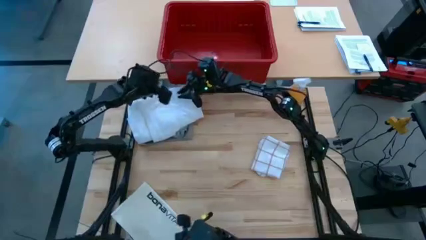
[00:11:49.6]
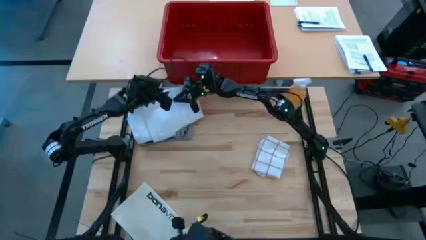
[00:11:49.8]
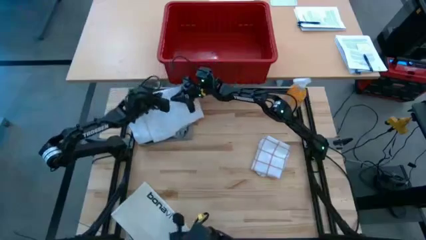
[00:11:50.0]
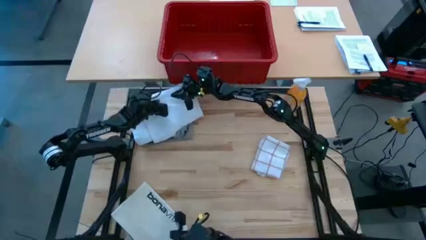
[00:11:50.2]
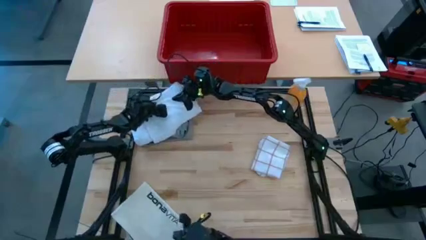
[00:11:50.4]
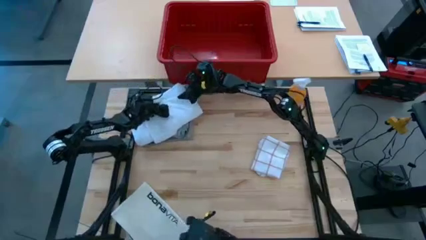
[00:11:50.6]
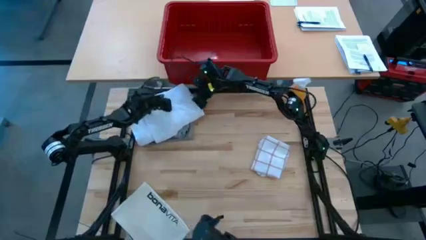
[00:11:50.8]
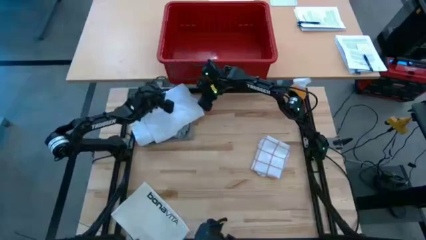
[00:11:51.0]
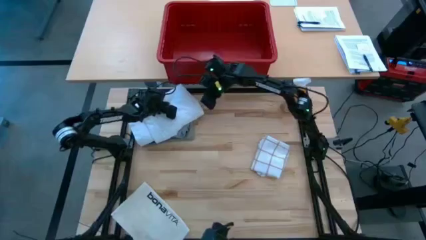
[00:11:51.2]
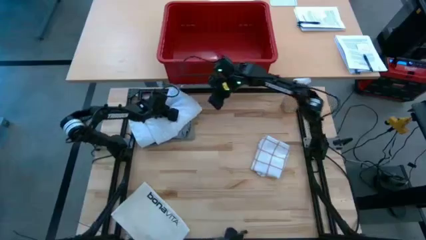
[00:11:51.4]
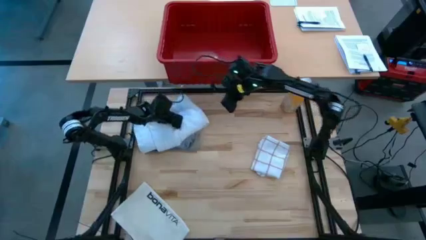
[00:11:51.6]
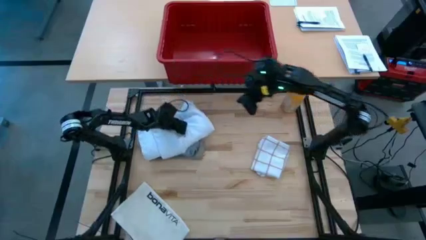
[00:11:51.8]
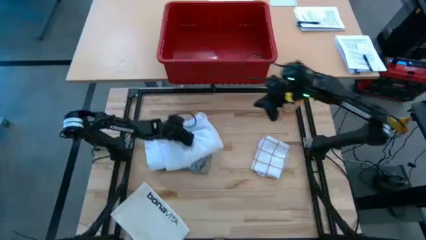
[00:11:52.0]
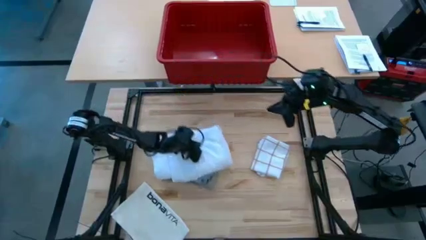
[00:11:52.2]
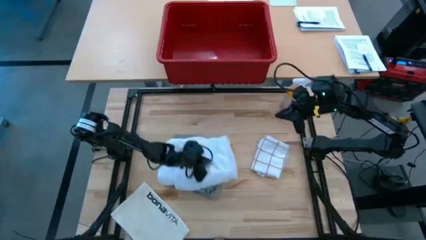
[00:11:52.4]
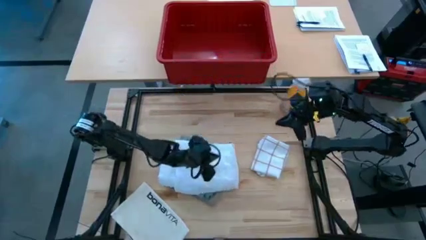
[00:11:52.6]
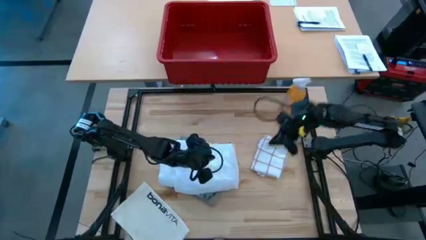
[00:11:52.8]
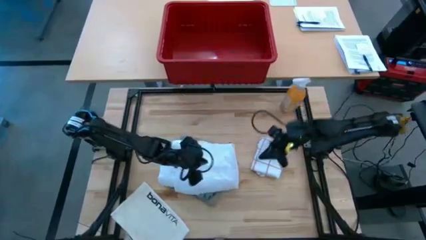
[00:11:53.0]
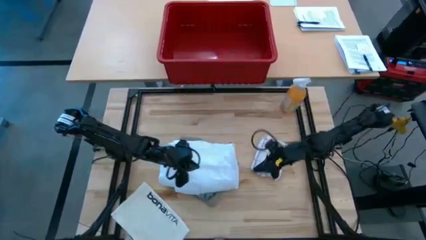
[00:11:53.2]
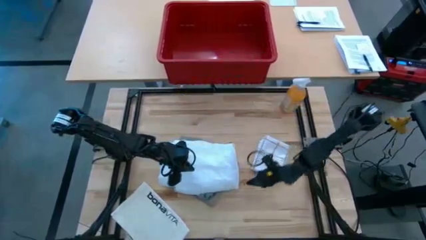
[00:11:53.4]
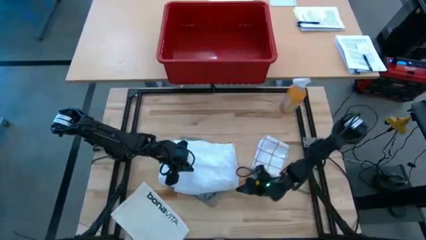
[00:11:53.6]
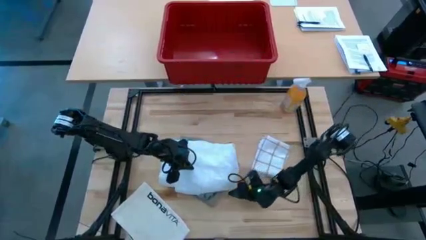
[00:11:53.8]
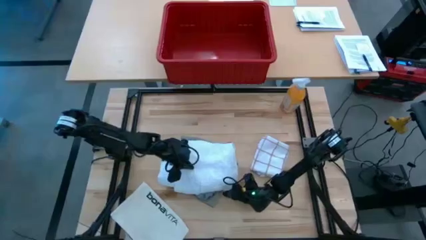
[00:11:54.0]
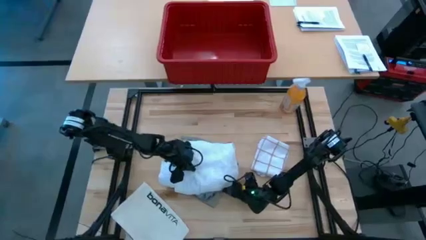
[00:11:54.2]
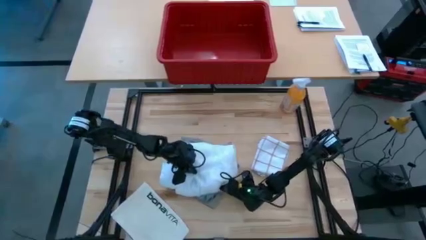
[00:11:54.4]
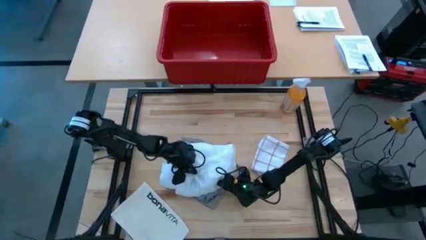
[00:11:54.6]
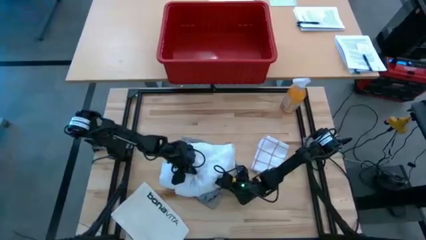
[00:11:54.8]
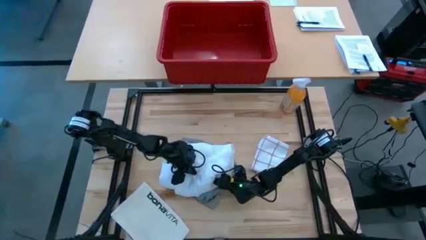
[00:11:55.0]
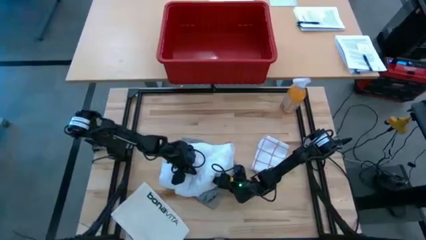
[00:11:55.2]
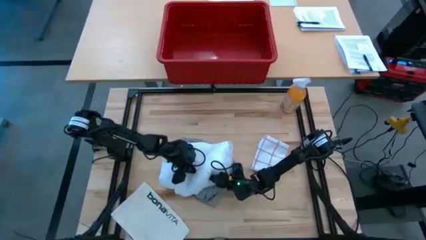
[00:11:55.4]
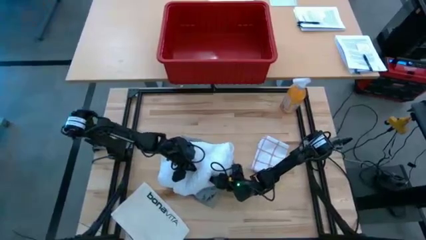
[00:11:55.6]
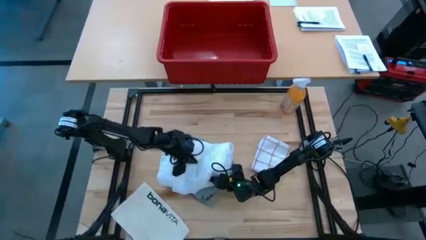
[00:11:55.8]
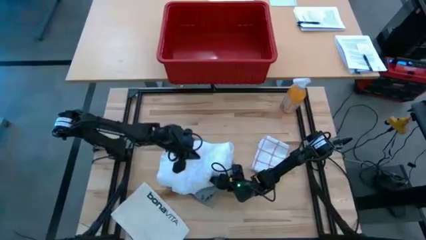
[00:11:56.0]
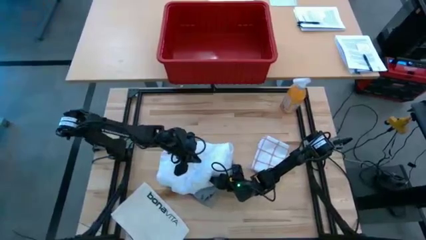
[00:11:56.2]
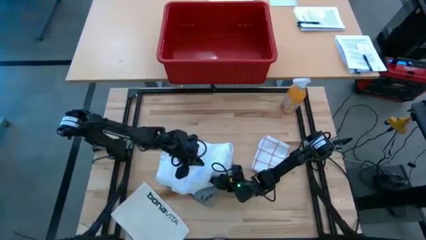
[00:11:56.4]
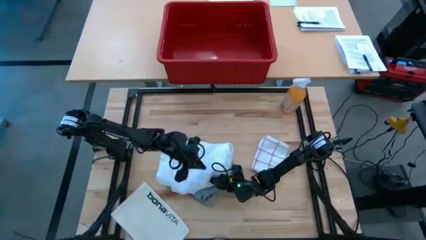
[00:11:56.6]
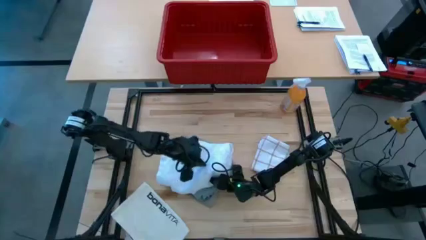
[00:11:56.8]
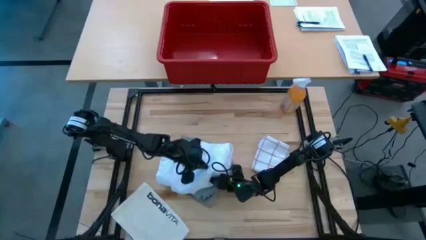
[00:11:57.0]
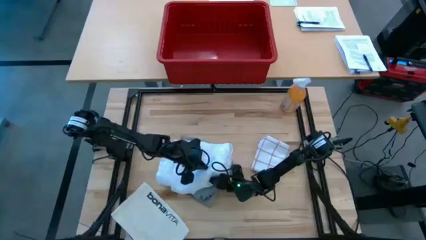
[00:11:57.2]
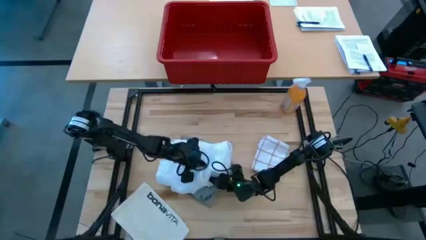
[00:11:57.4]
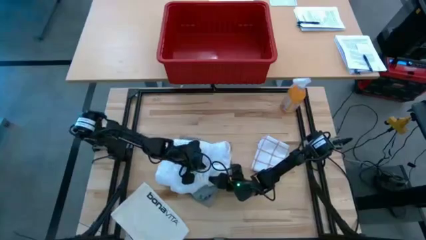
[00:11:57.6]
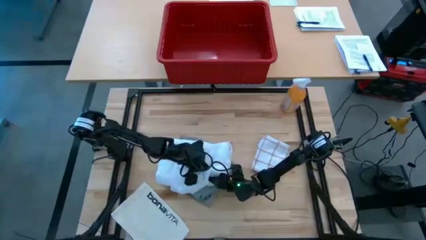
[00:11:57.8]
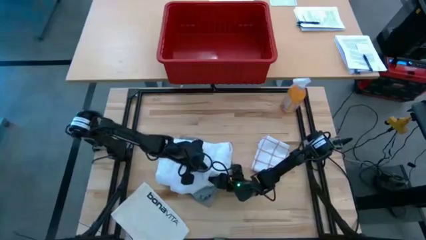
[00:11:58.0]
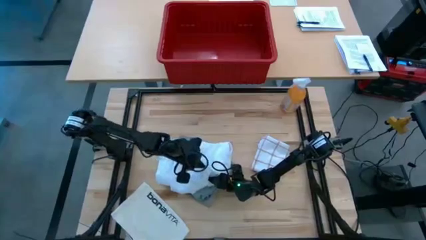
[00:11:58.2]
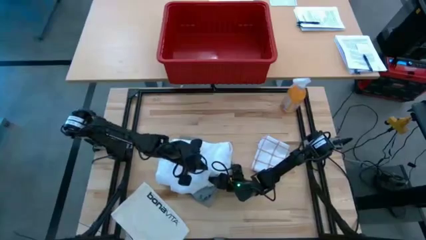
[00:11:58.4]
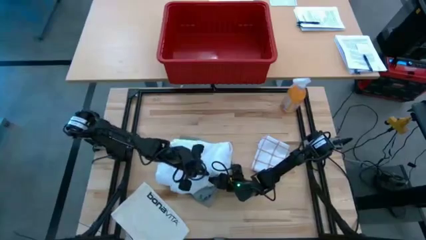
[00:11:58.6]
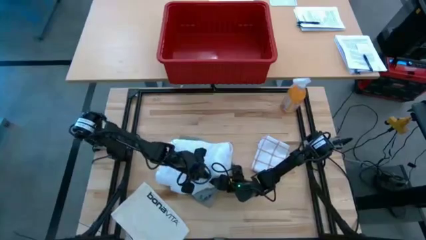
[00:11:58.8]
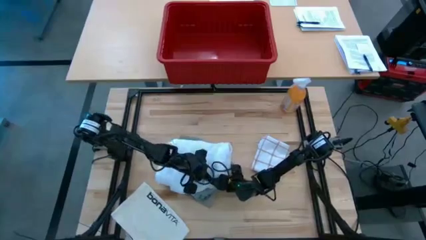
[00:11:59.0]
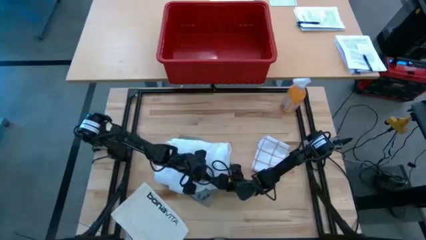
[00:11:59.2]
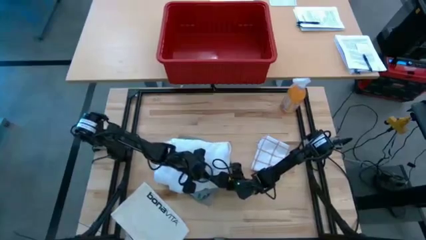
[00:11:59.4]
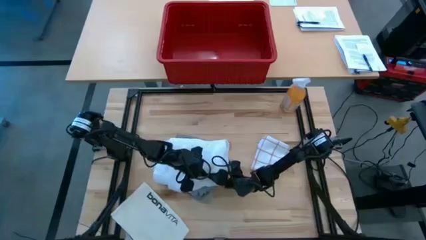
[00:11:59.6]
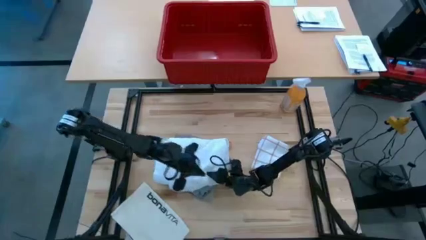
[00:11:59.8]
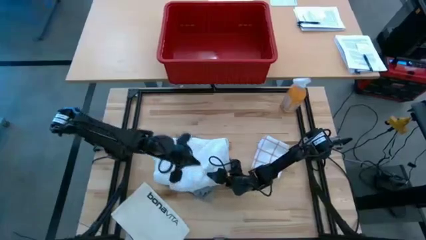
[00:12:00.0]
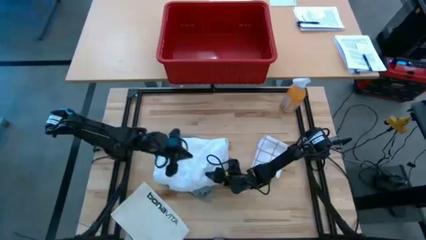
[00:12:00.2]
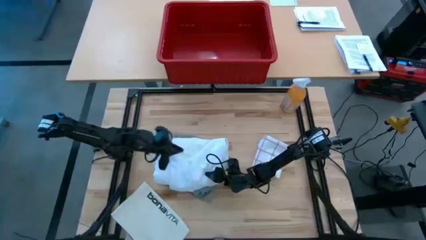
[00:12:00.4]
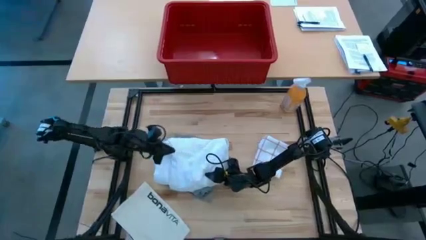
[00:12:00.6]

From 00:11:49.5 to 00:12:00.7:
Task: Fold laundry
Put the stack of clothes into the red bin

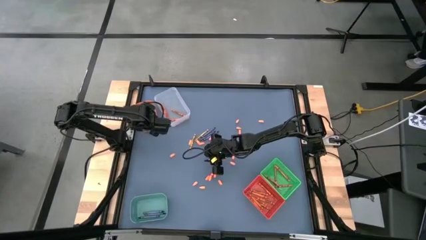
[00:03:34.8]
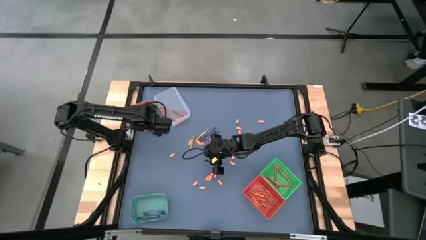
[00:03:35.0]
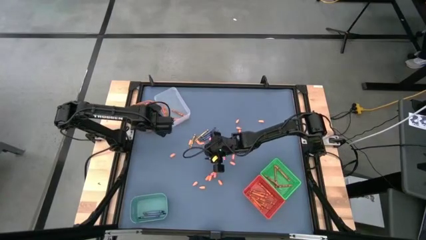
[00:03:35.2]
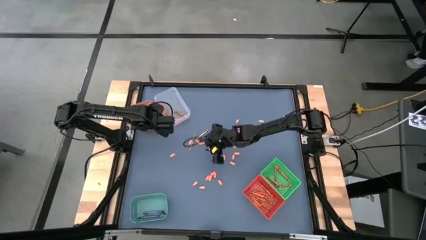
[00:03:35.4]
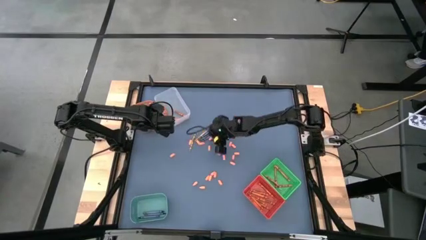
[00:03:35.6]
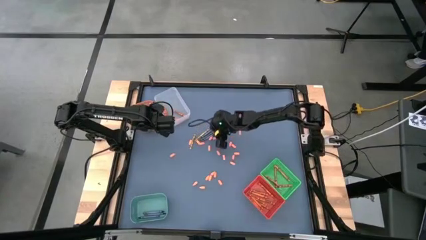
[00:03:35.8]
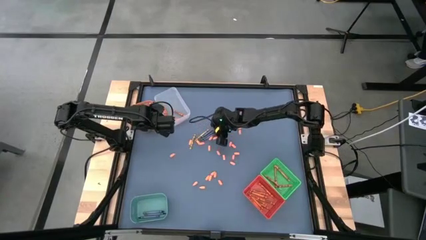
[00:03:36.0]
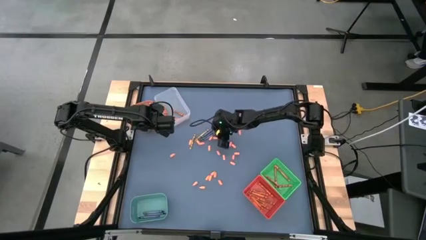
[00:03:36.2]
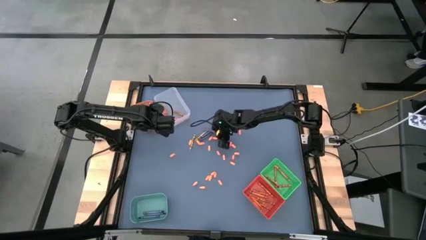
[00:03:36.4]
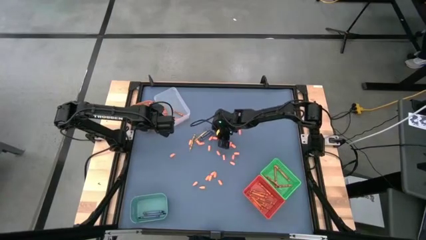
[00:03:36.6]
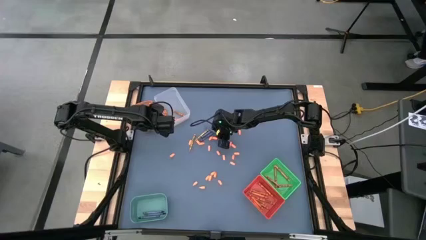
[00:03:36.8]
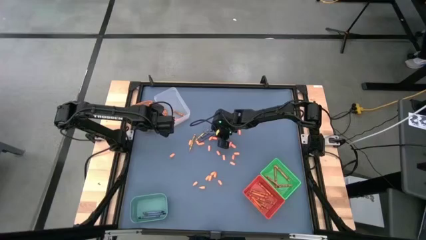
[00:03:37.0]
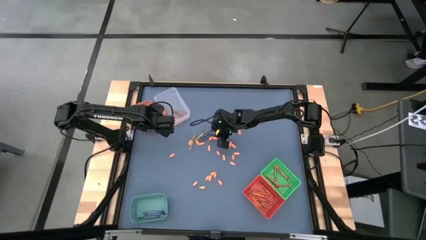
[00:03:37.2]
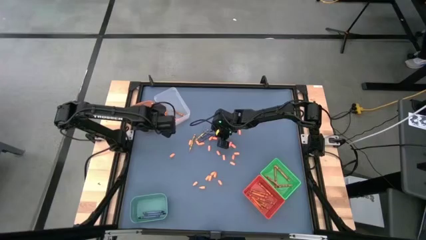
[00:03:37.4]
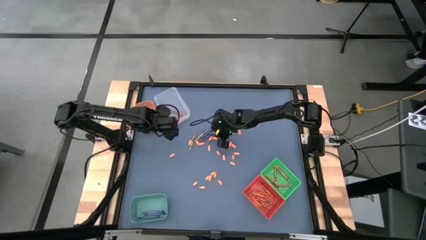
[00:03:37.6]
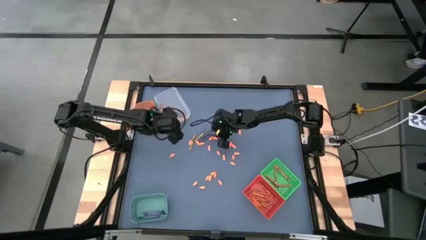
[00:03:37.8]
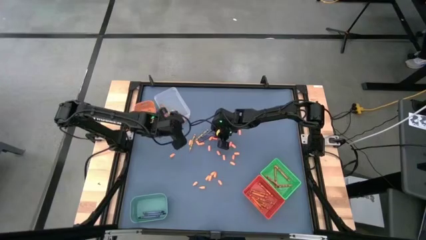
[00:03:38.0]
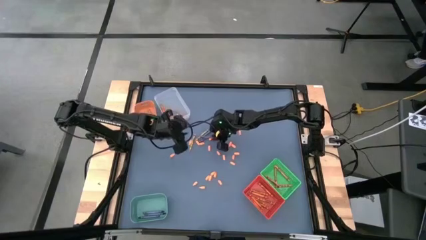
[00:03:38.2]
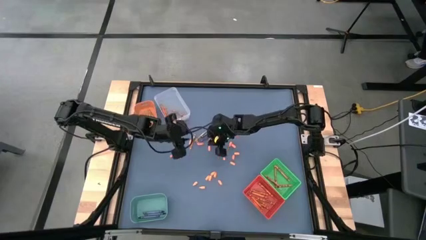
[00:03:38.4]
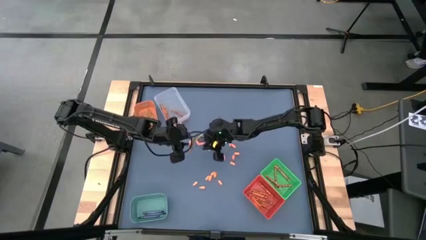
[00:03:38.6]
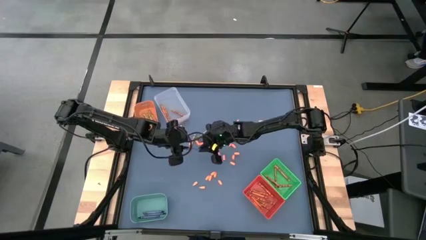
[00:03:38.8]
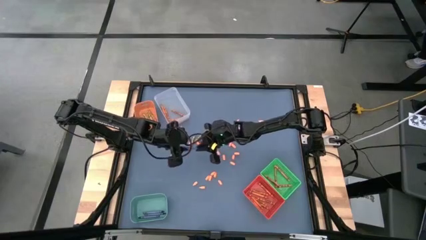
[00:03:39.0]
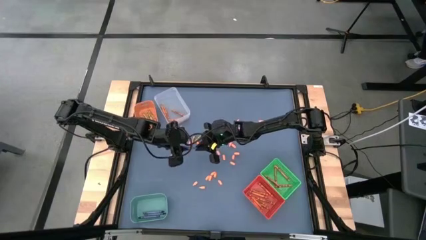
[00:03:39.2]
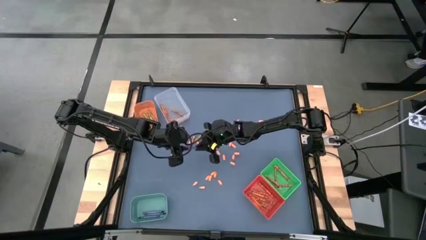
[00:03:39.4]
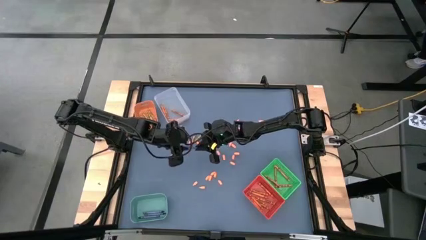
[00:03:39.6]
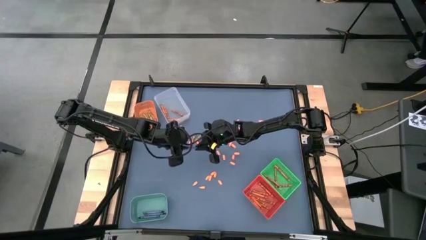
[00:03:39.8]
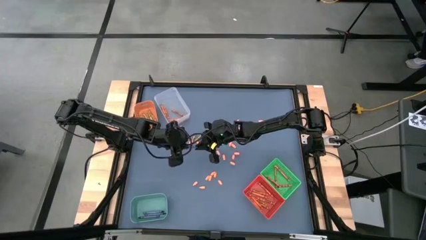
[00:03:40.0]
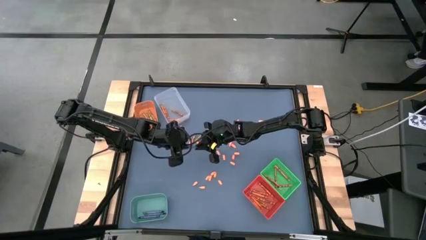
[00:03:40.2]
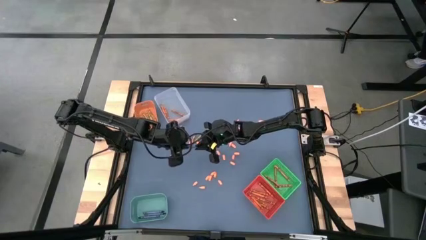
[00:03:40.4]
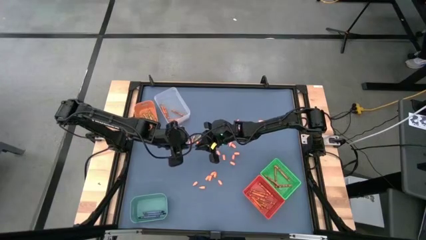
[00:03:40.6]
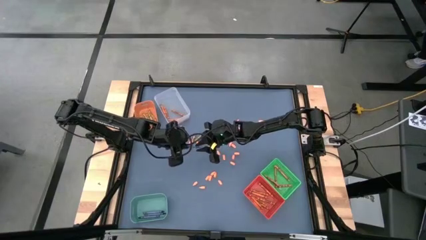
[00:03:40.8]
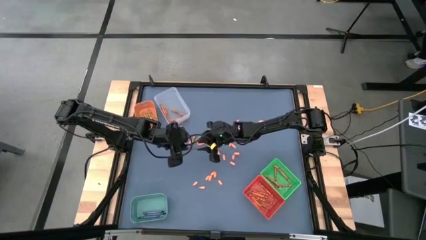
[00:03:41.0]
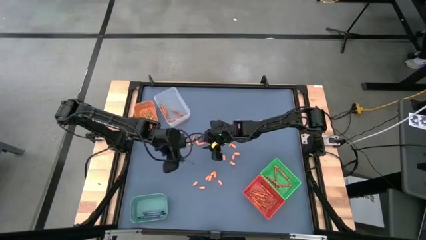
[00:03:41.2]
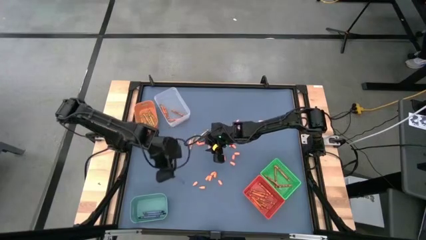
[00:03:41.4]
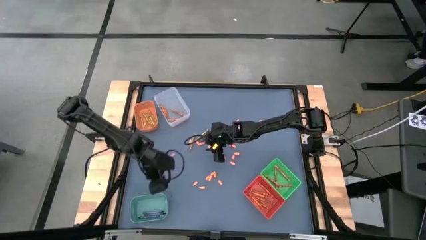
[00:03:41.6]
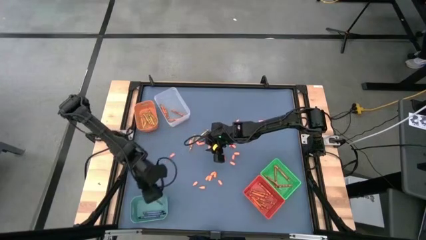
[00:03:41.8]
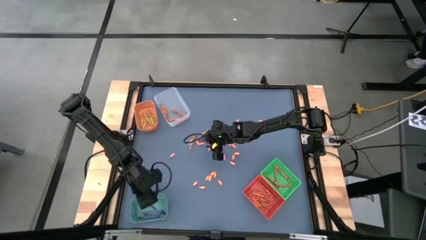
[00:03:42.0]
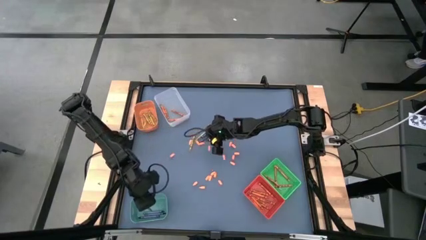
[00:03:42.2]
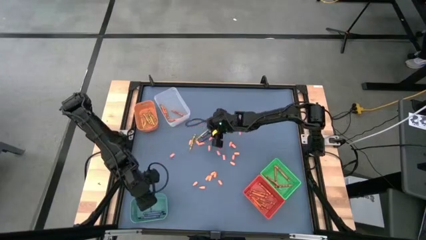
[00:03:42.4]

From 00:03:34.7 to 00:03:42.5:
Task: Sort crayons
Put the blue crayon into the blue bin
